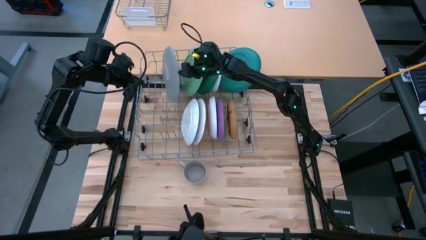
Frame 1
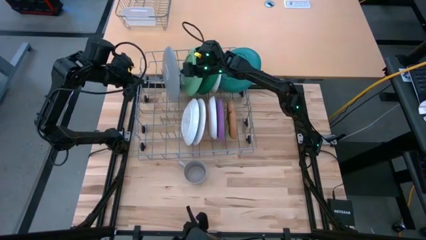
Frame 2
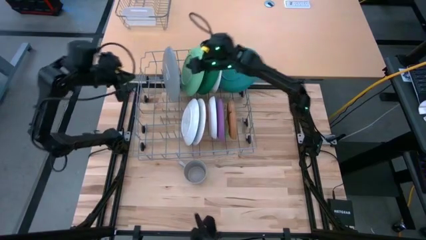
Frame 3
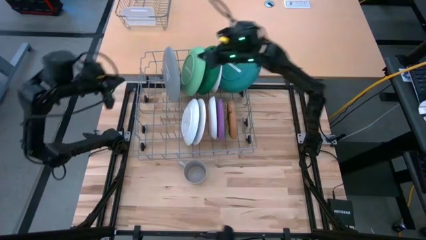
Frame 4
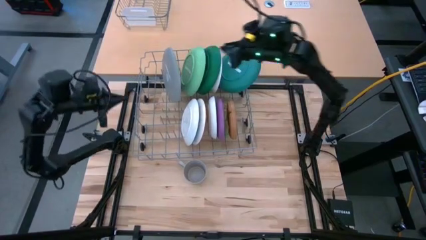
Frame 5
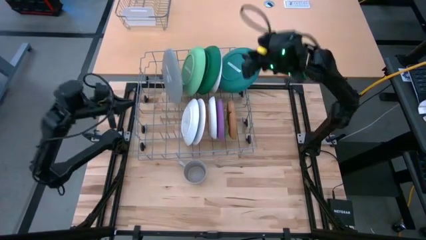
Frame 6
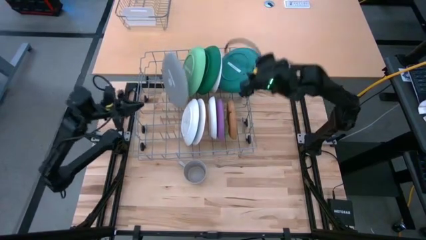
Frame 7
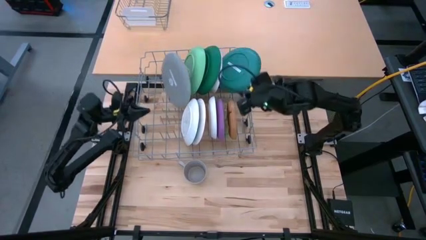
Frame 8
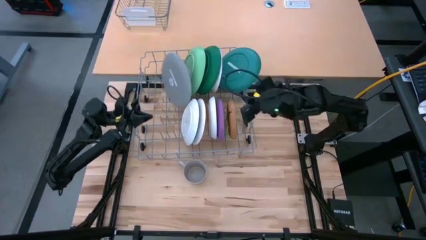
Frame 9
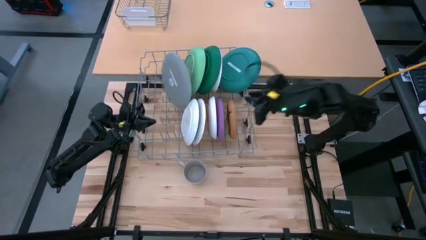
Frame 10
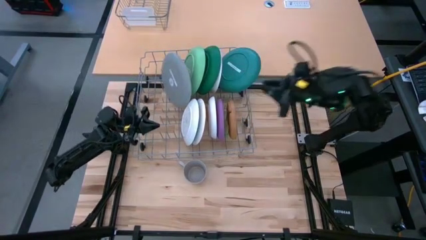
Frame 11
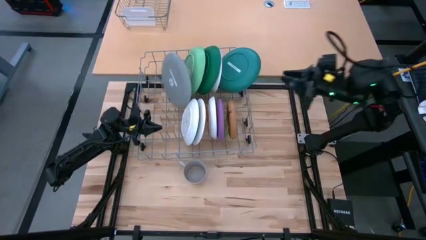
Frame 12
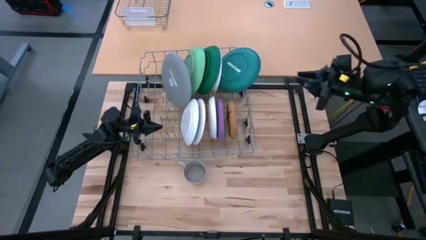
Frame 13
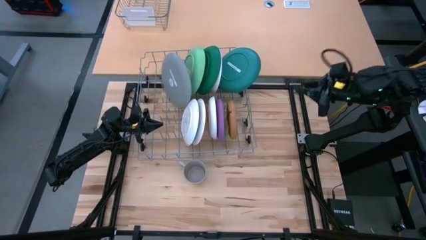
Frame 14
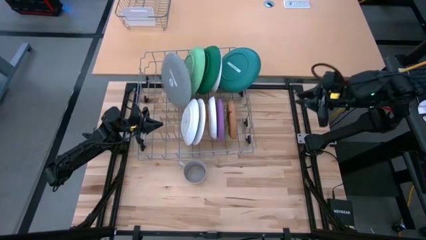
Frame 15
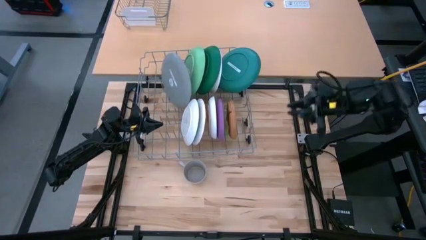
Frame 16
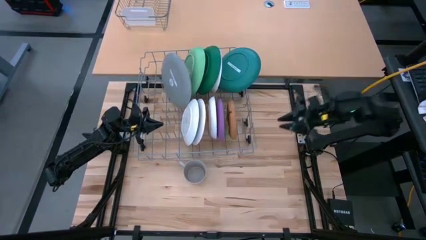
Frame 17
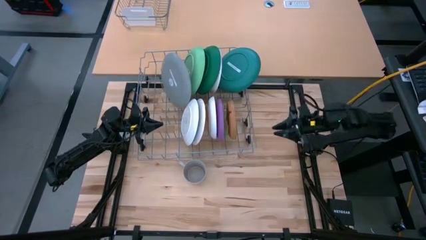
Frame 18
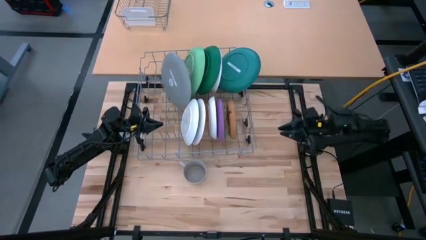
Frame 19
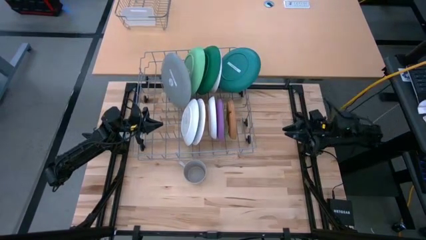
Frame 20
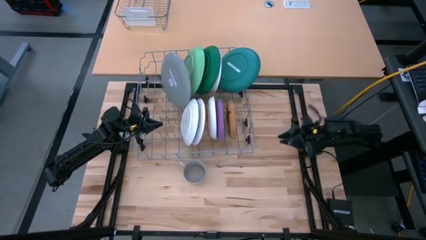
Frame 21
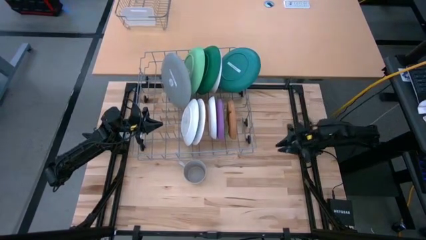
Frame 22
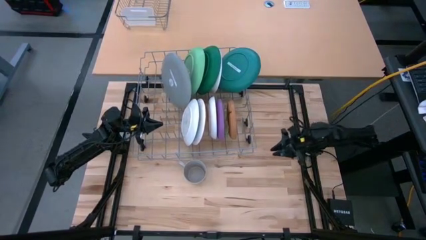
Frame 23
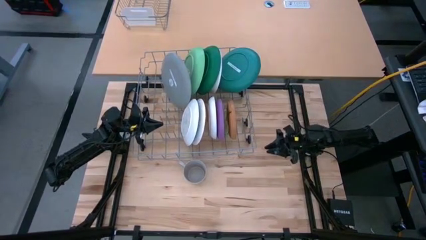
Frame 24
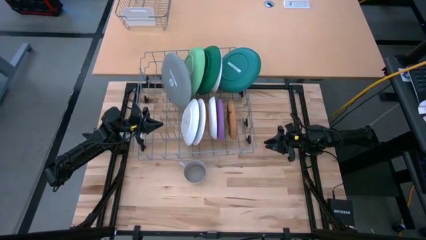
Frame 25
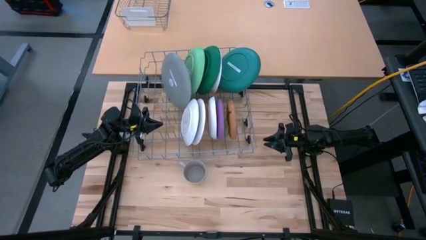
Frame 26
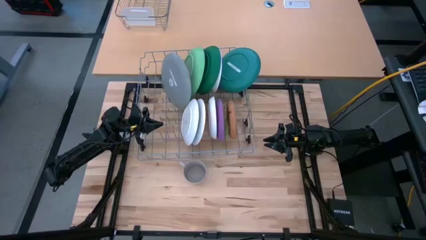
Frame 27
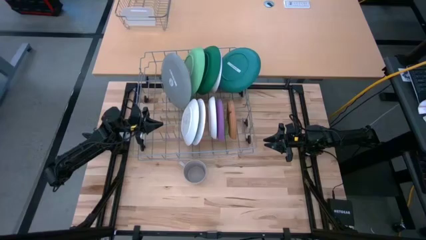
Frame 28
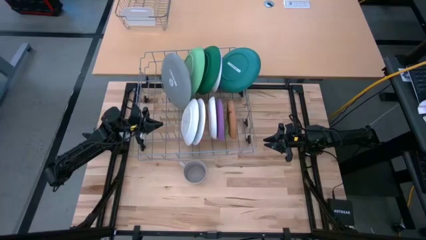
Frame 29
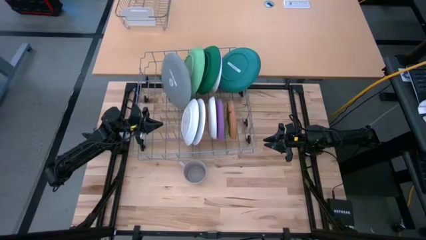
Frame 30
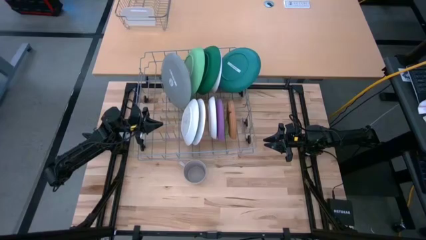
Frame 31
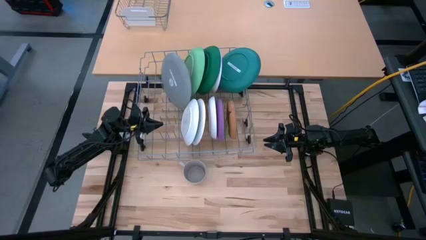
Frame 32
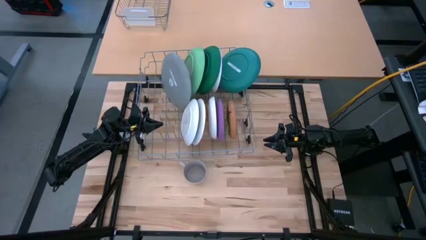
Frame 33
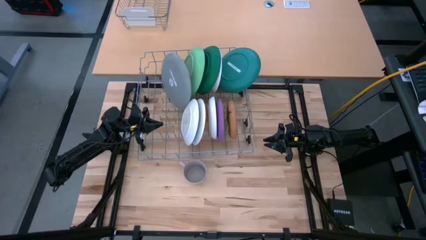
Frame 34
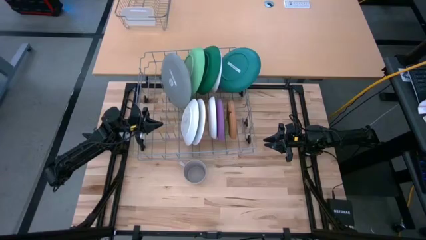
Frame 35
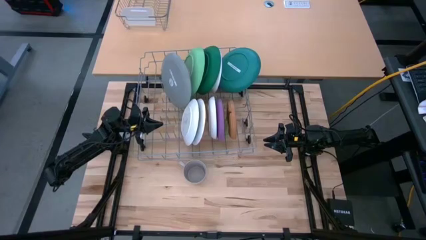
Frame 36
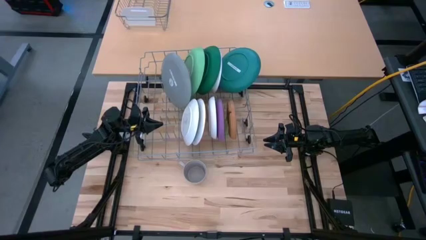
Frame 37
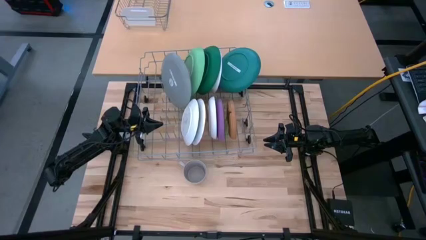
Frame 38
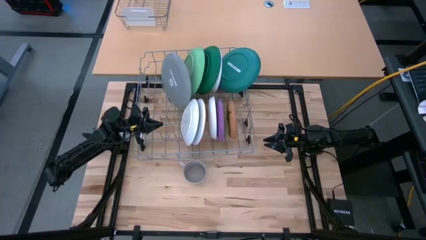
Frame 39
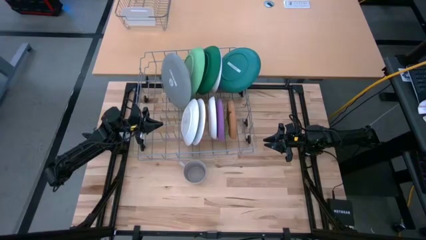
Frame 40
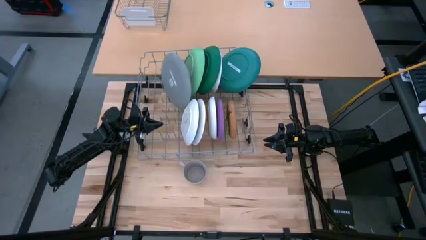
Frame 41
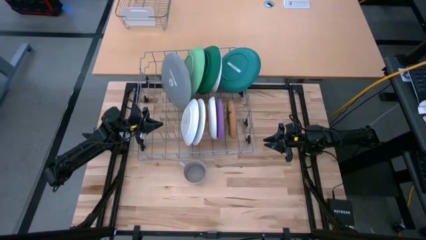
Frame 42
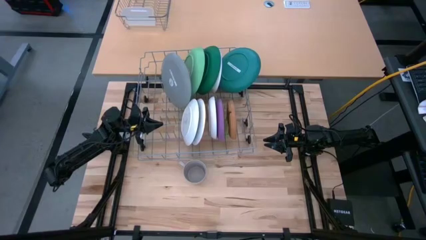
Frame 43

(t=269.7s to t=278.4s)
Task: Sort dishes
Return to Home Position

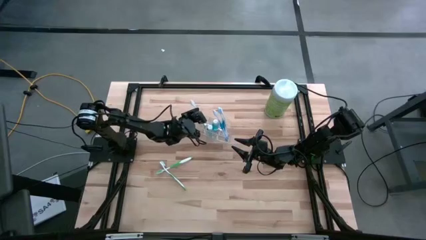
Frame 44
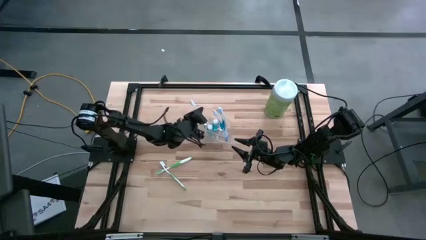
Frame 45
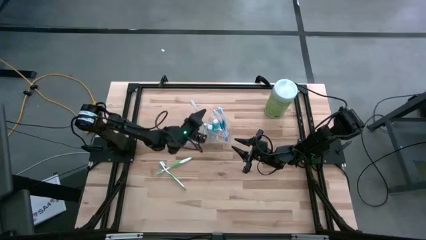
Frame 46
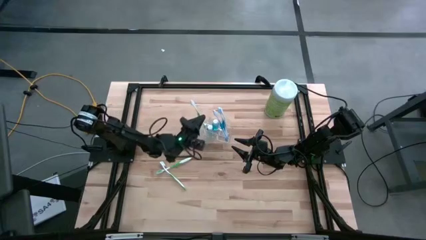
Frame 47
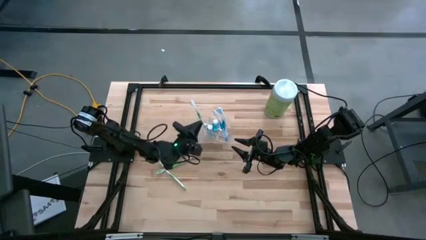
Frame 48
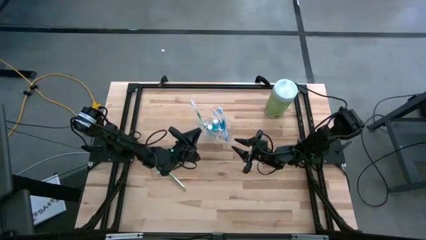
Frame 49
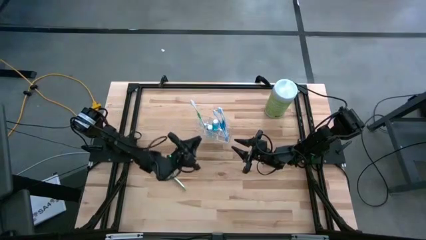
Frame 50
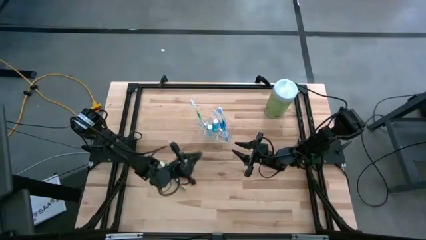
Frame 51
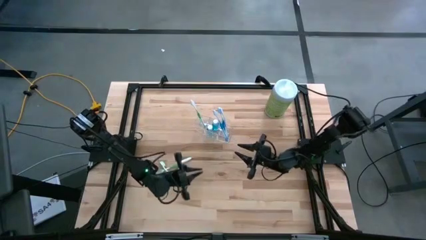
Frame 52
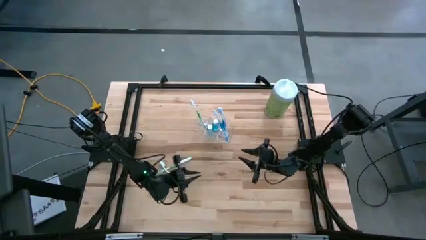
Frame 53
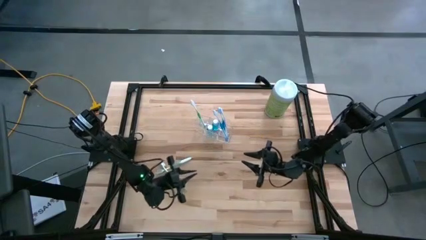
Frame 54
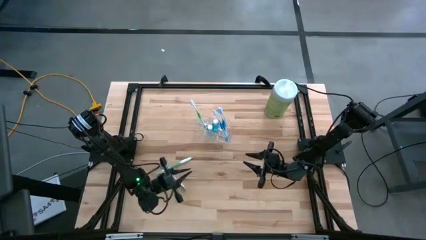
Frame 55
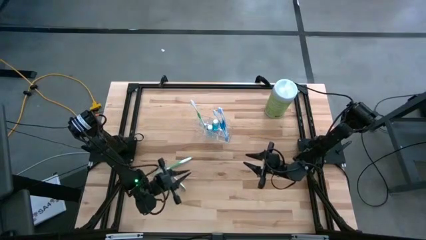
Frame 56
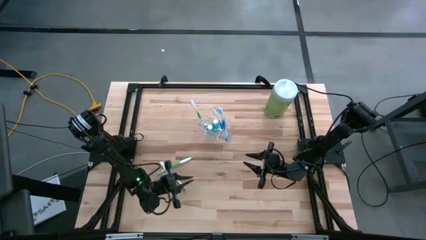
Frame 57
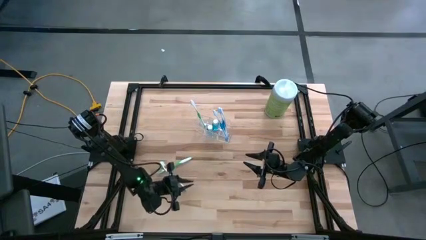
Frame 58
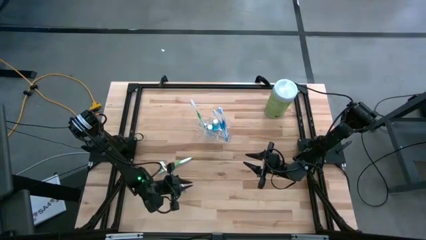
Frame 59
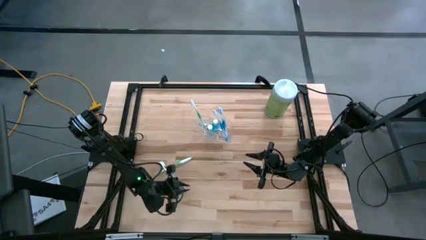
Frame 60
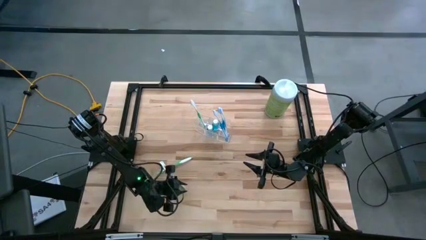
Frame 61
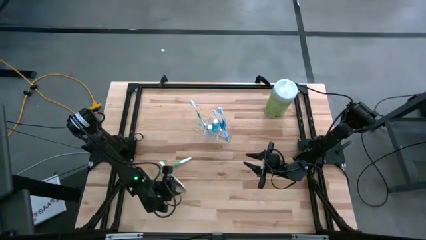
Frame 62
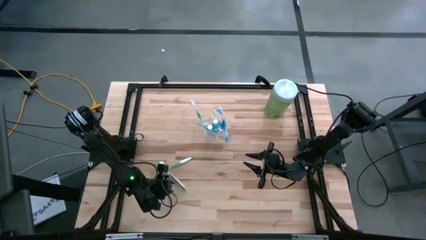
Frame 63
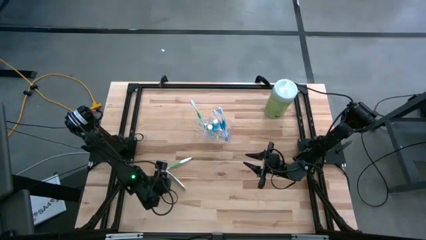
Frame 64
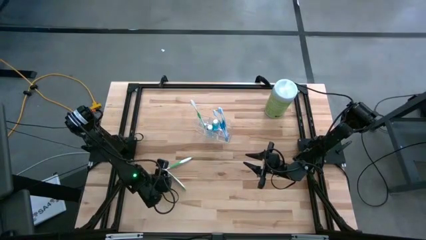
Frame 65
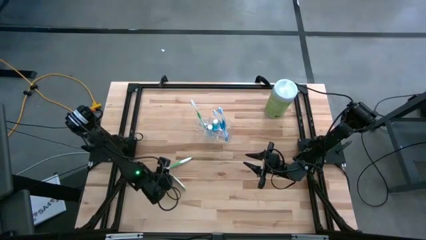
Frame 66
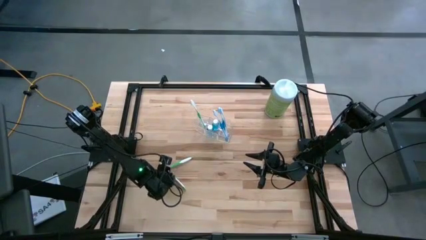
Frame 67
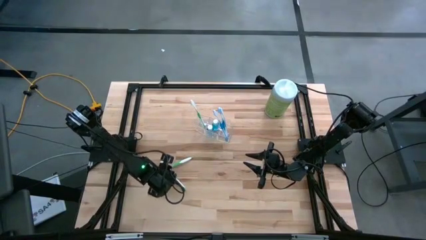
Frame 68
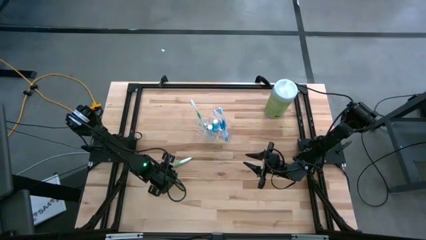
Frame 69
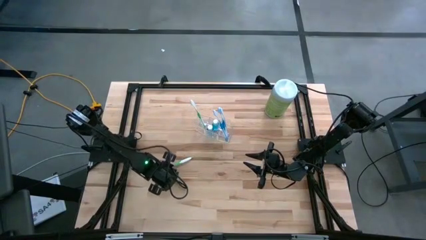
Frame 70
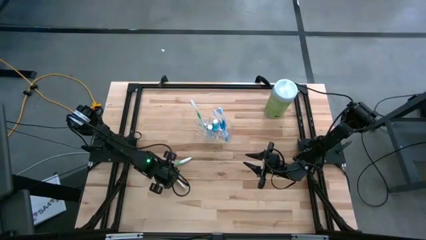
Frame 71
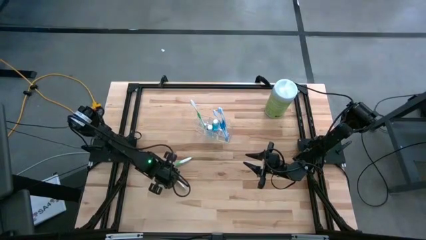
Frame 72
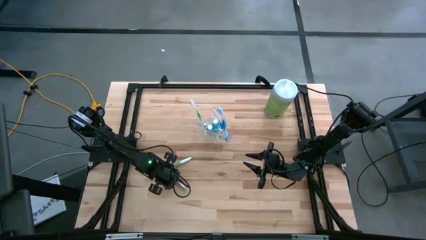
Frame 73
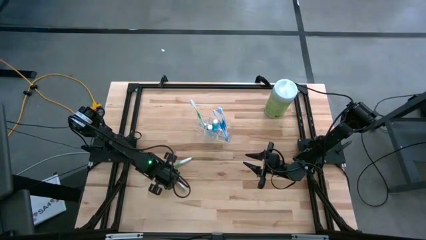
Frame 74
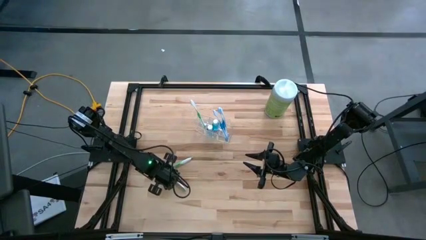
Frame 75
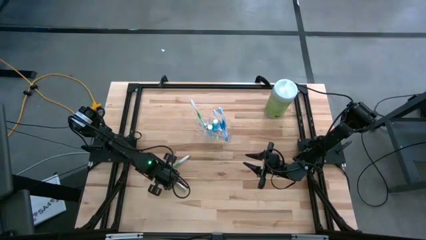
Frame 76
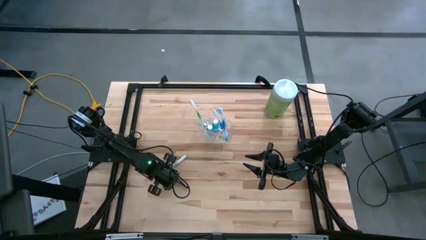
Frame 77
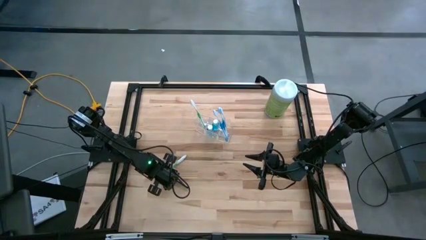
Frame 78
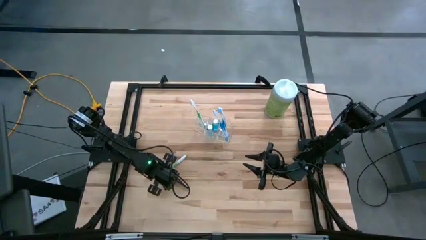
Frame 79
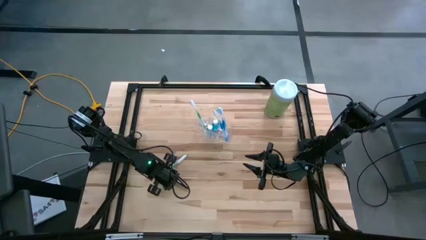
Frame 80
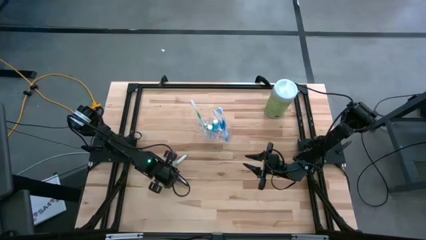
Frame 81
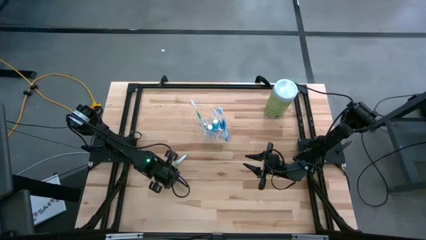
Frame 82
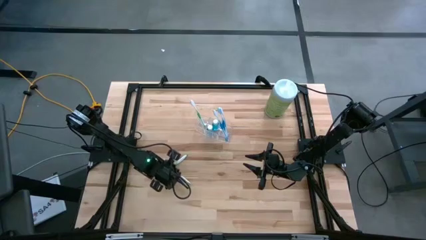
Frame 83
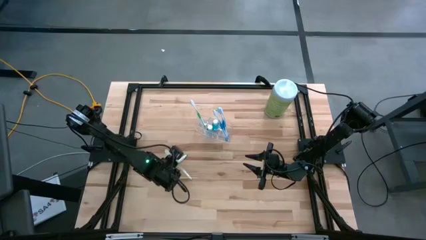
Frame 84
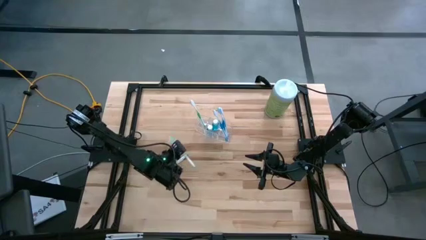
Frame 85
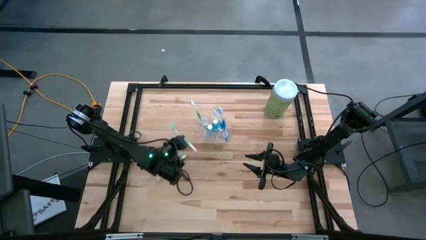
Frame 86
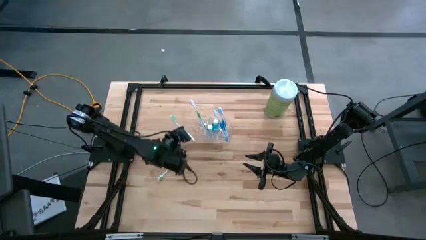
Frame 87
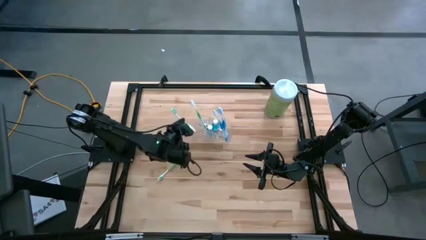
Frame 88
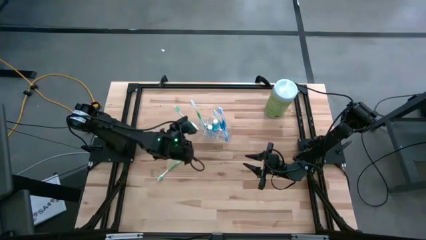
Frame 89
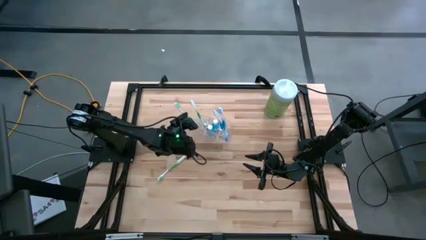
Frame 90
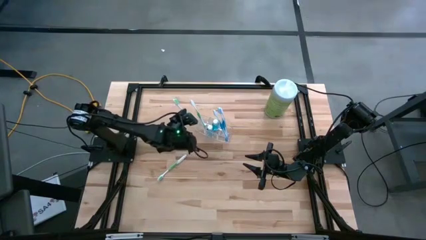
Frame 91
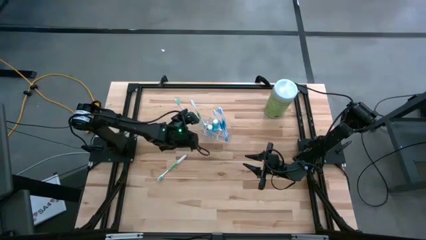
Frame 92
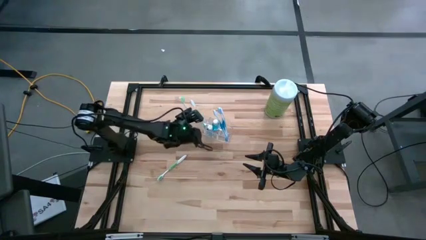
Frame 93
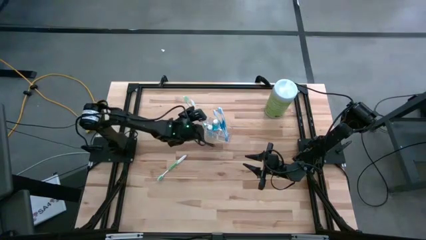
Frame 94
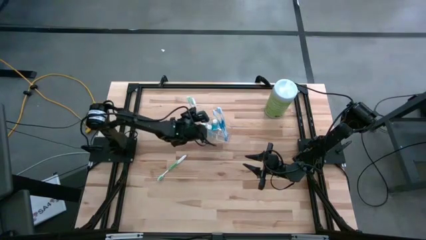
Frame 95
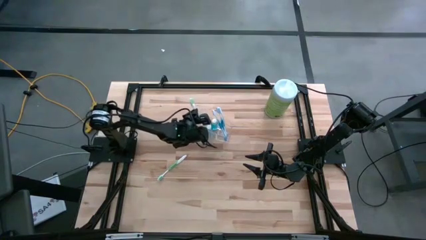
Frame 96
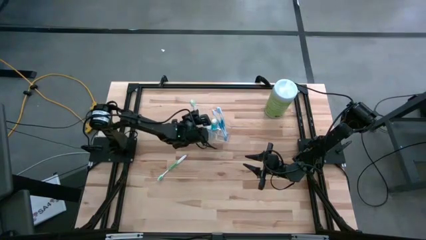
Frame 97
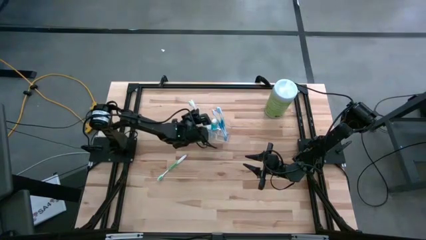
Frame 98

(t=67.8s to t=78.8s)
Task: Pick & Place toothbrushing station
Put the bottom green toothbrush into the transparent organizer
